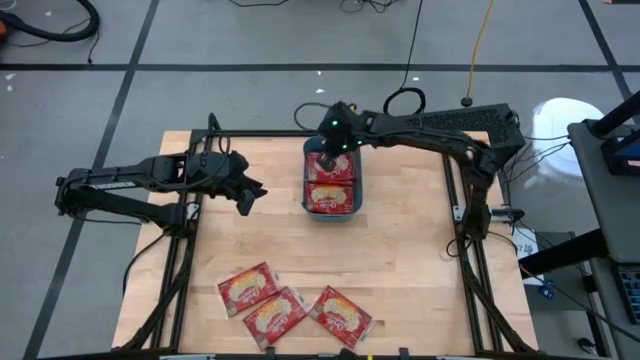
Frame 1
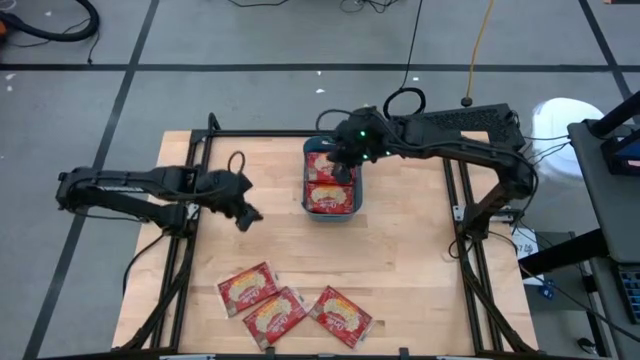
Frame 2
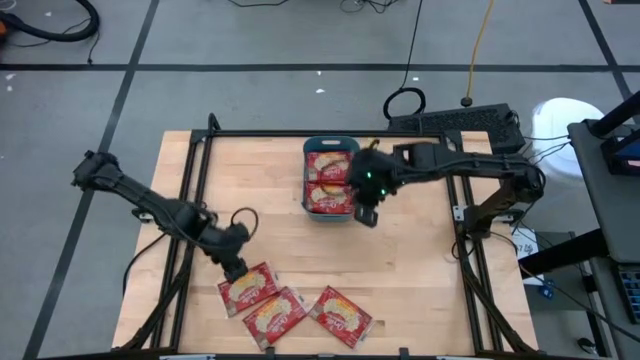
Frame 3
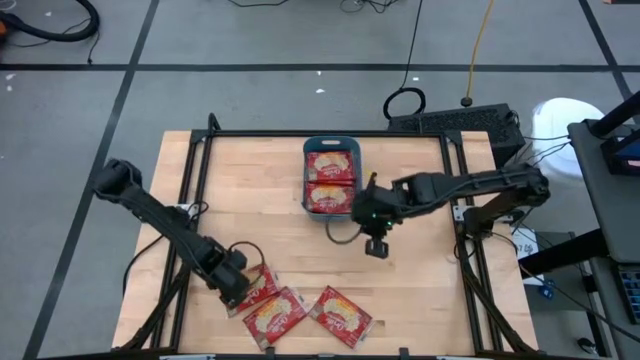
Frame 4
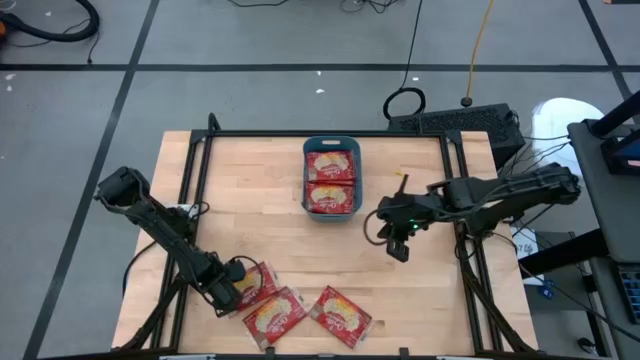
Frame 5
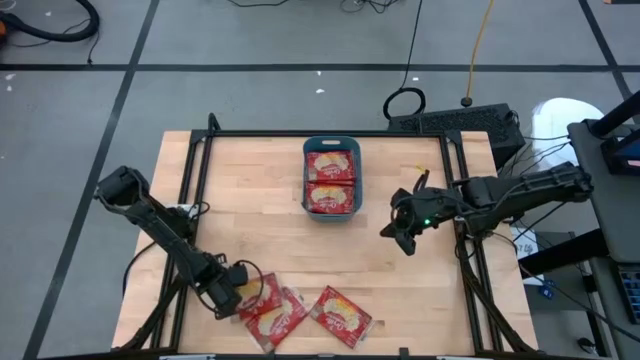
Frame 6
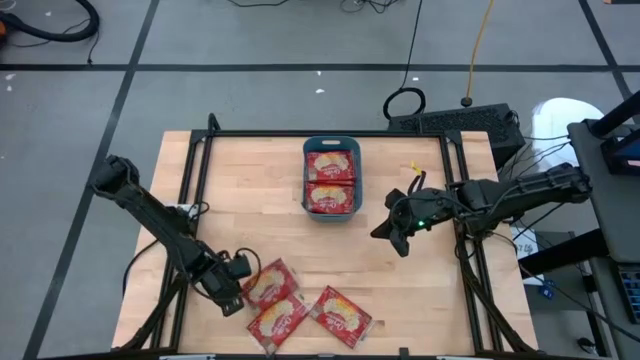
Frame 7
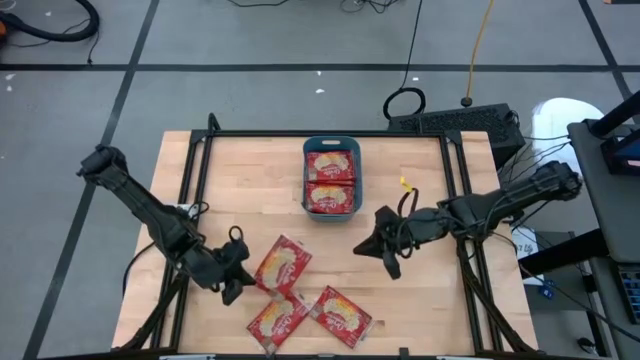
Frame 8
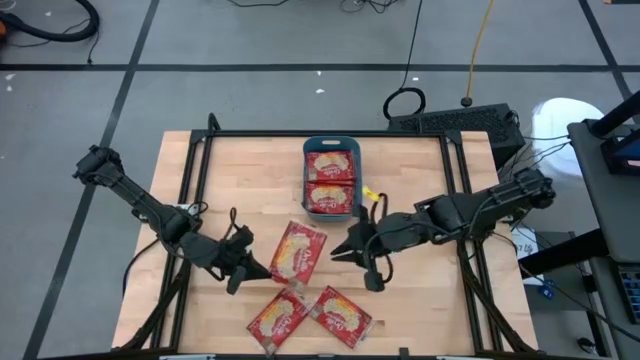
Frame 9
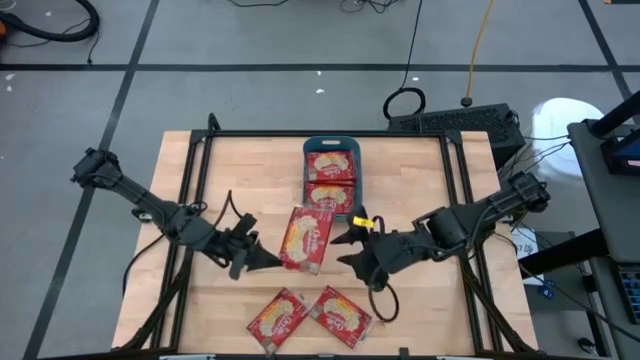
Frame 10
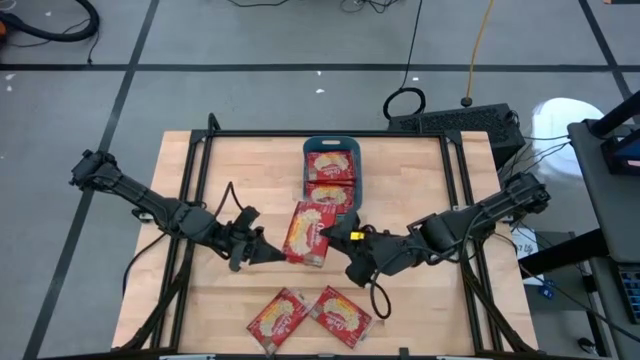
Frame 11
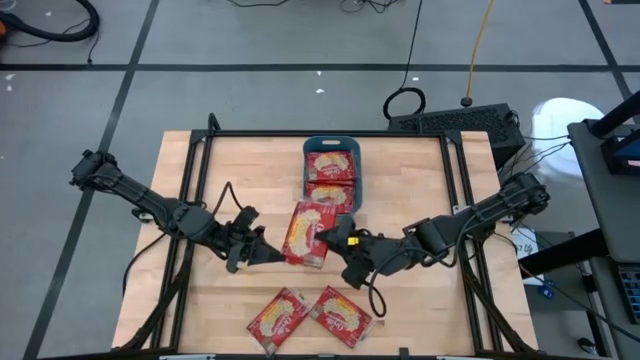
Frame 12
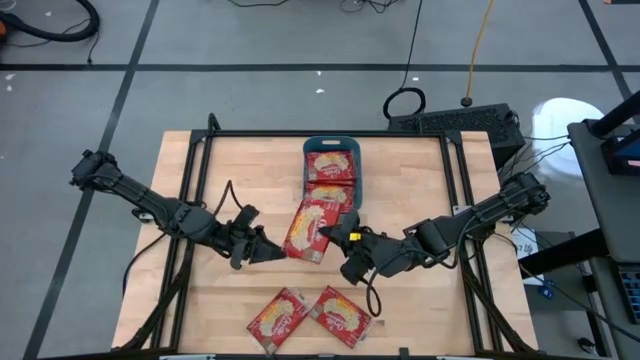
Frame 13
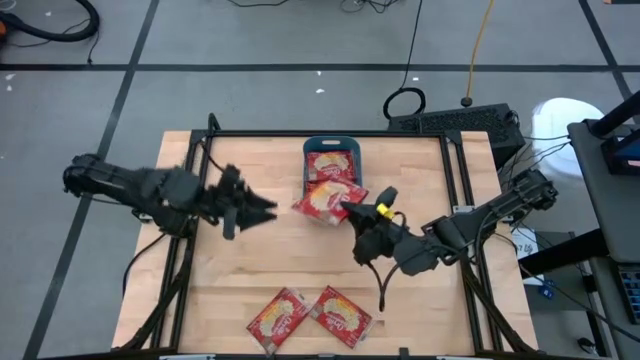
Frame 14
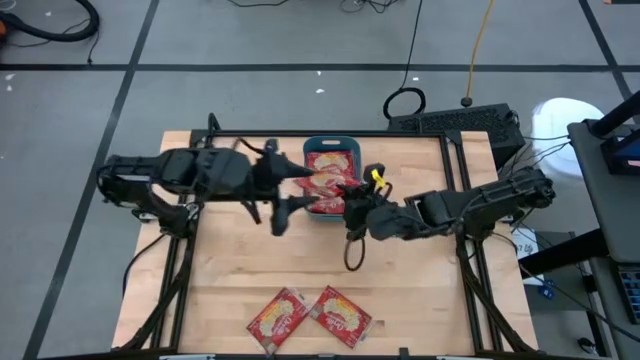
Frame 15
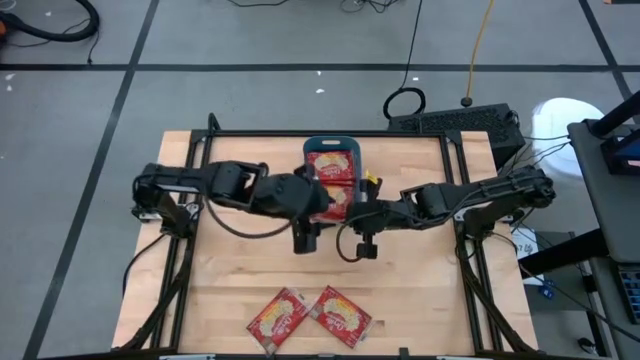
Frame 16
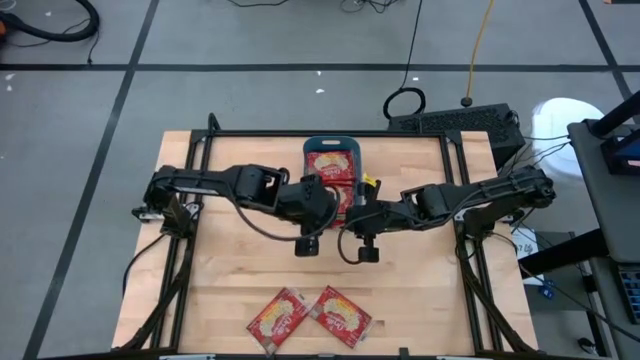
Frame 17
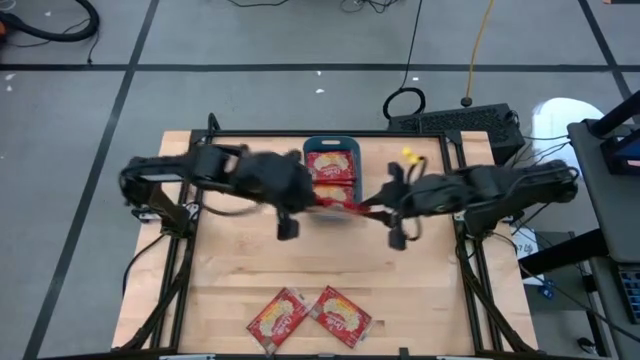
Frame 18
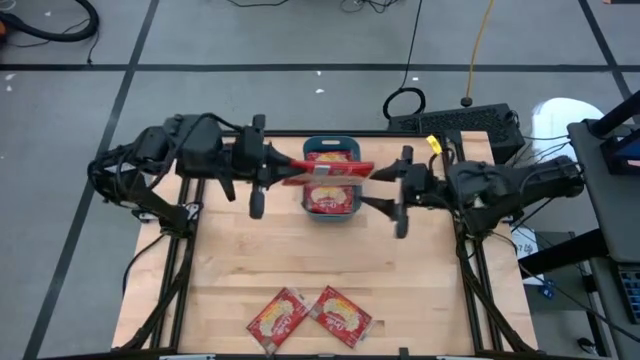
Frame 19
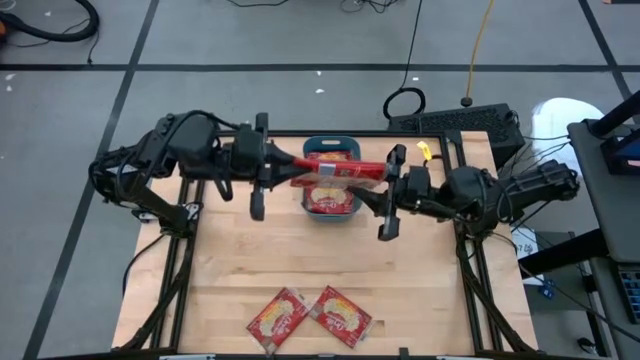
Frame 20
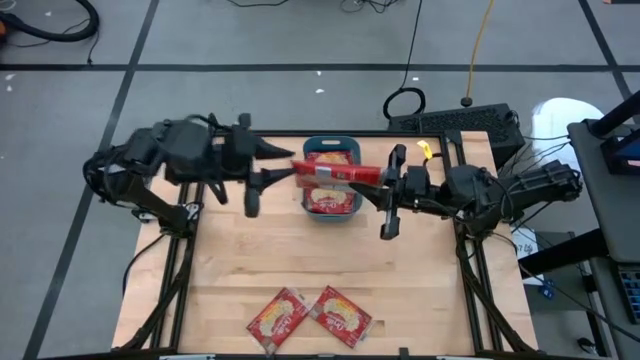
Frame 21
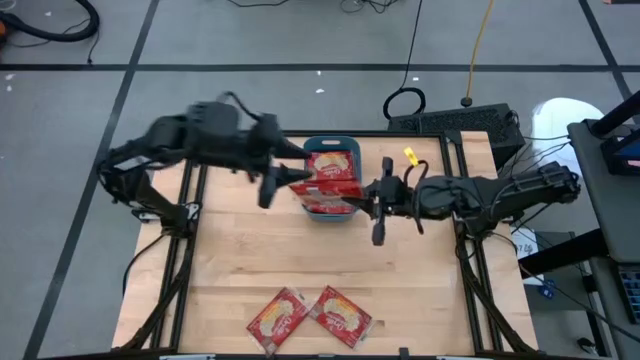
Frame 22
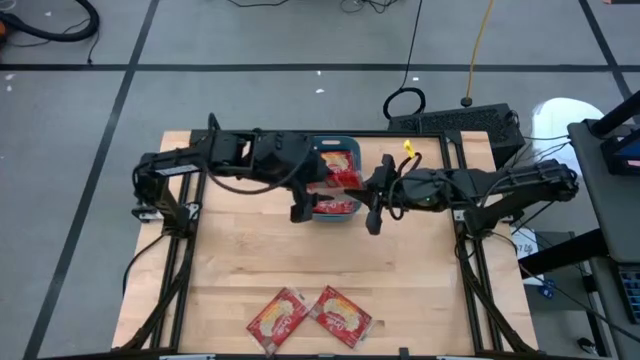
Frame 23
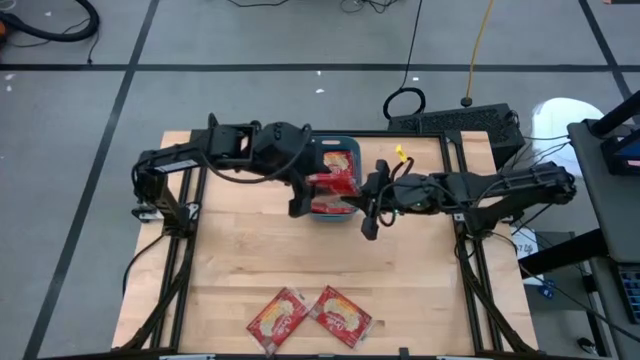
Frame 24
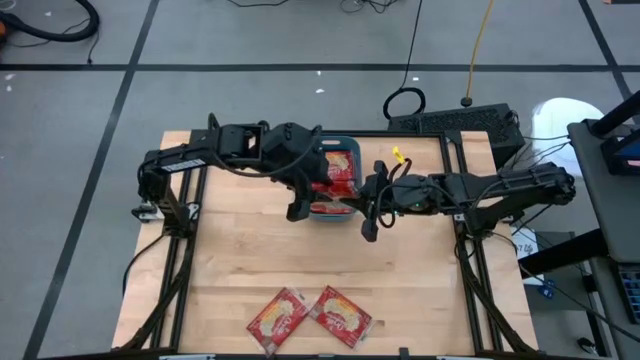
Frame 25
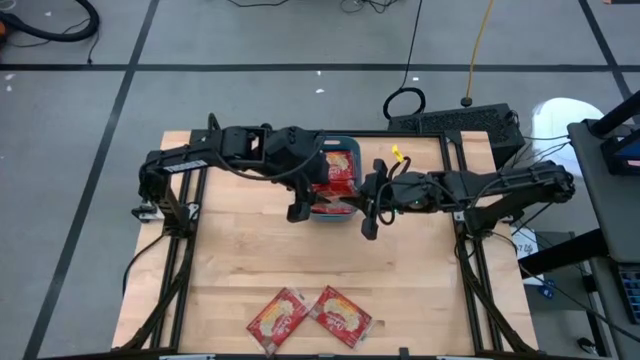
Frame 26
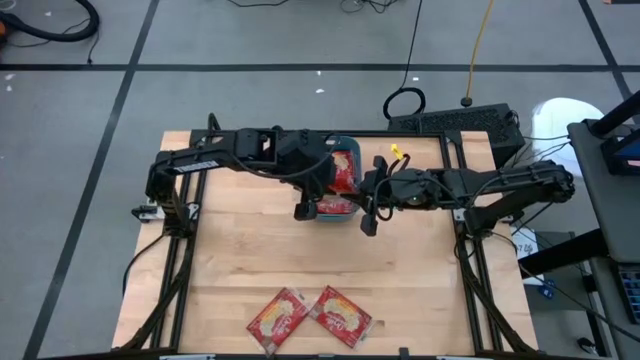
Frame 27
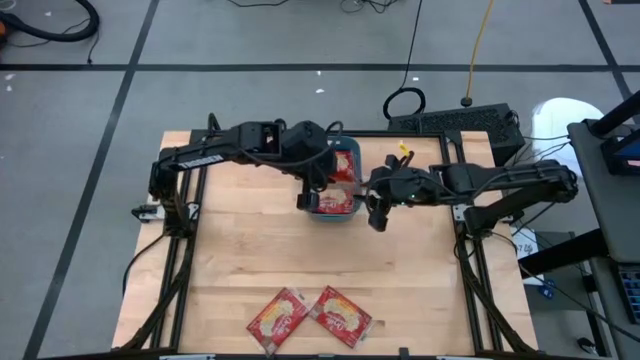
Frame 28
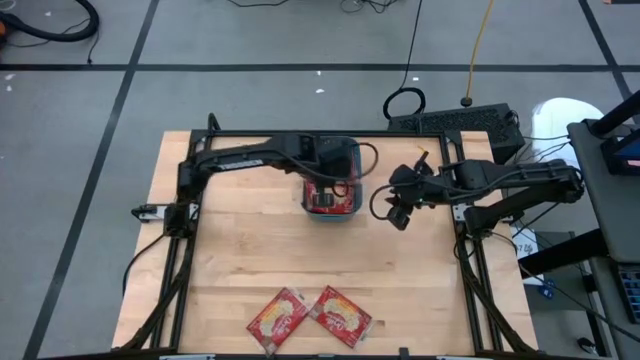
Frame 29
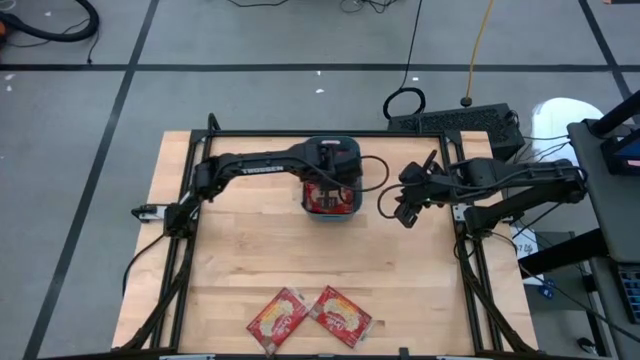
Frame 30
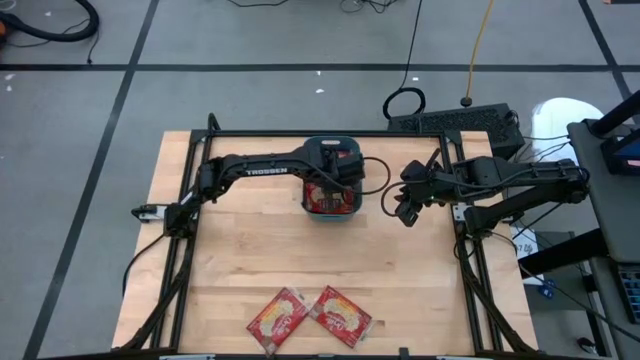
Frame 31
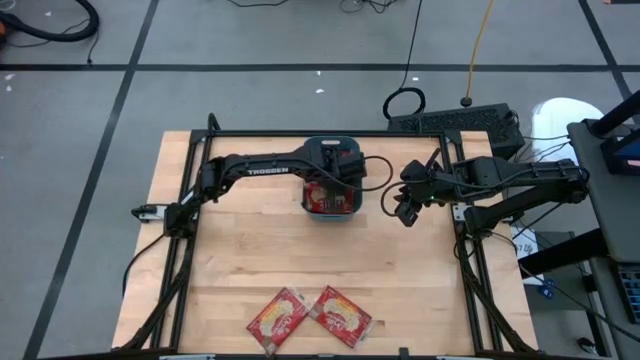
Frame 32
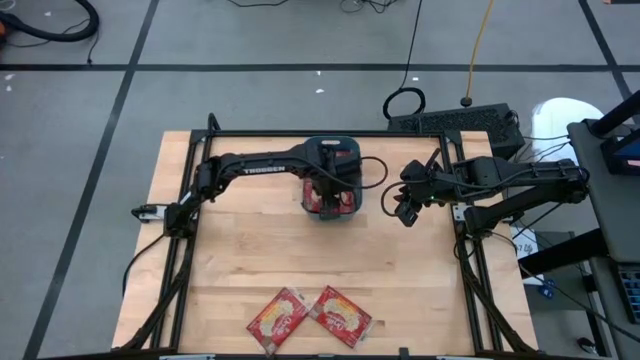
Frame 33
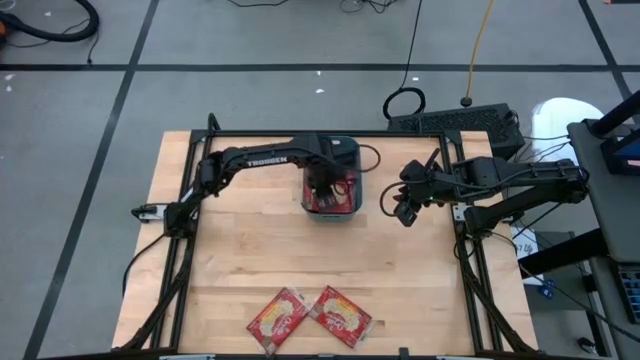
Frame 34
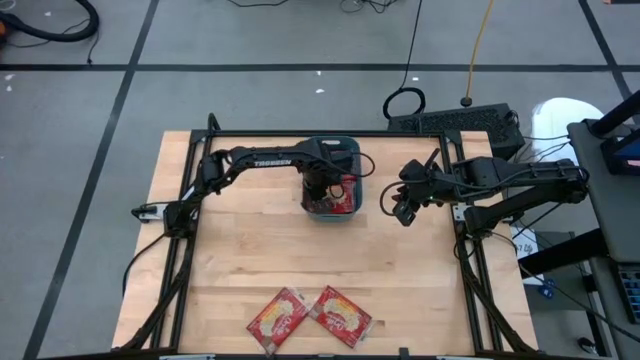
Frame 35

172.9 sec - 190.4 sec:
Task: Sort popcorn bags into baskets
Put the red popcorn bag into the blue bin

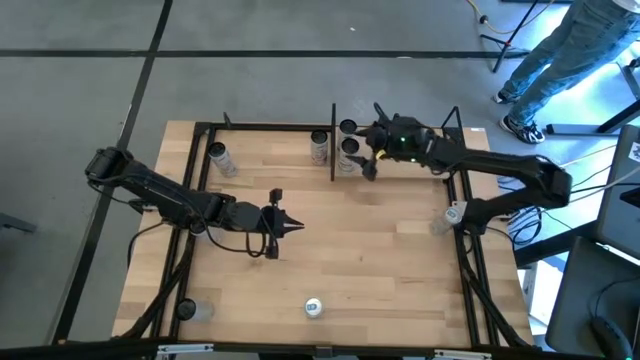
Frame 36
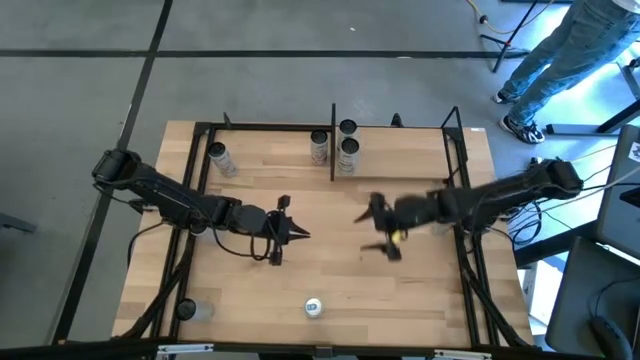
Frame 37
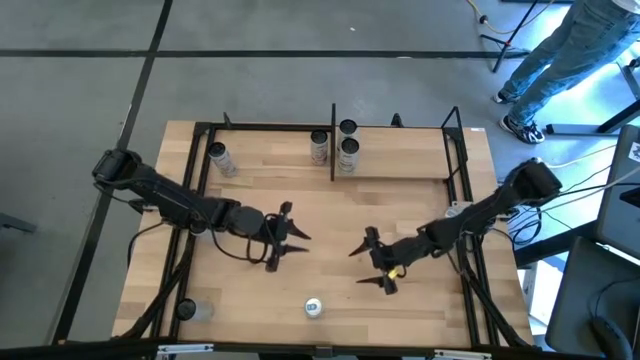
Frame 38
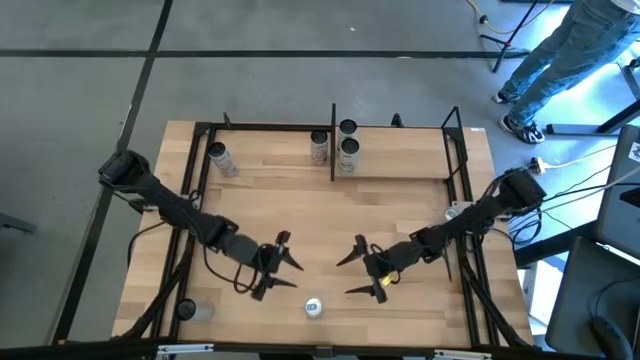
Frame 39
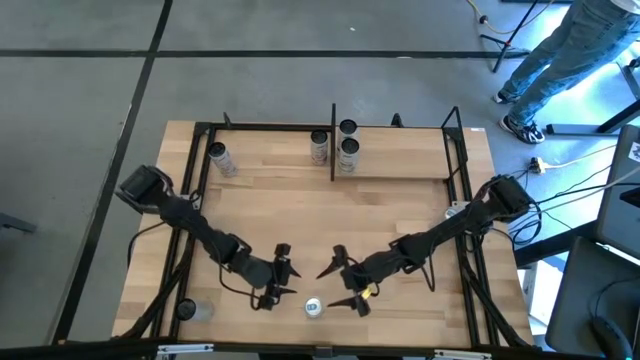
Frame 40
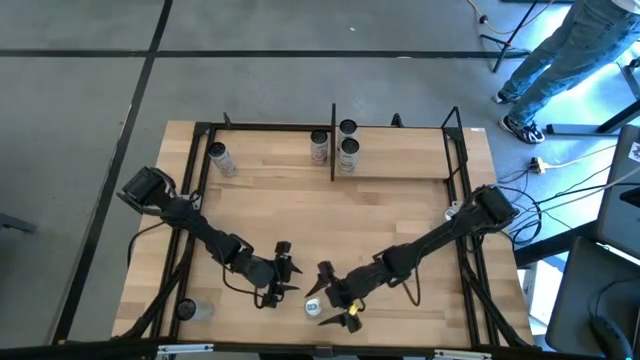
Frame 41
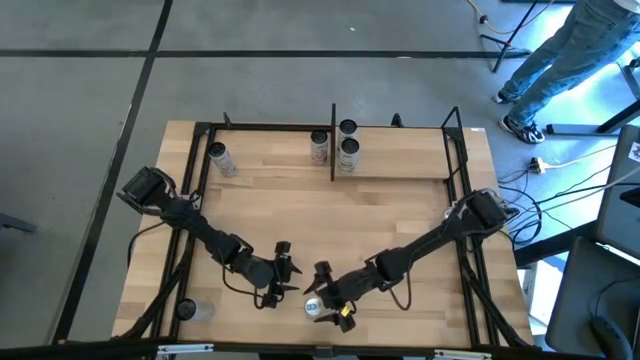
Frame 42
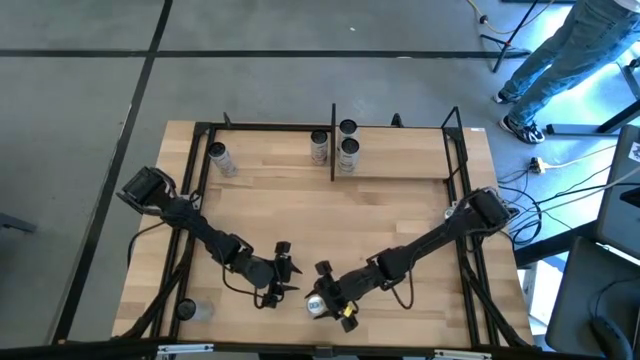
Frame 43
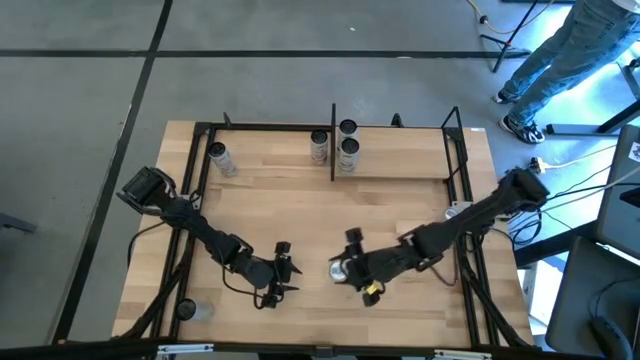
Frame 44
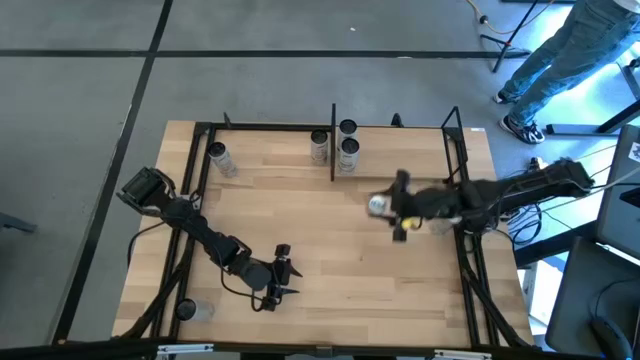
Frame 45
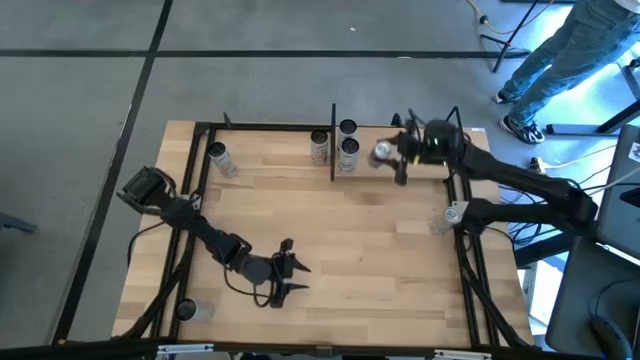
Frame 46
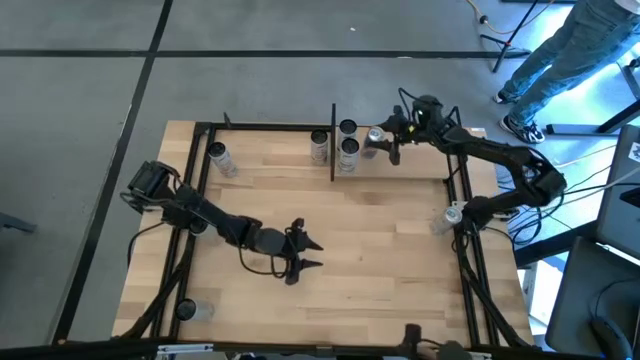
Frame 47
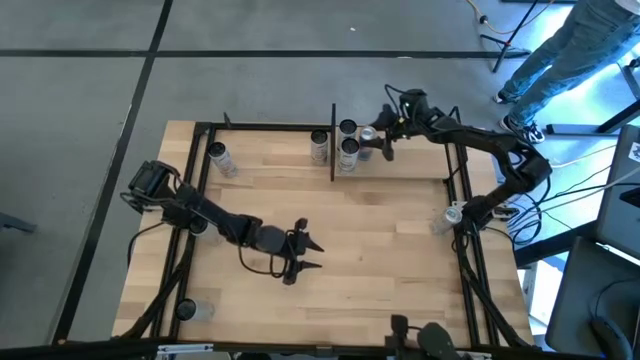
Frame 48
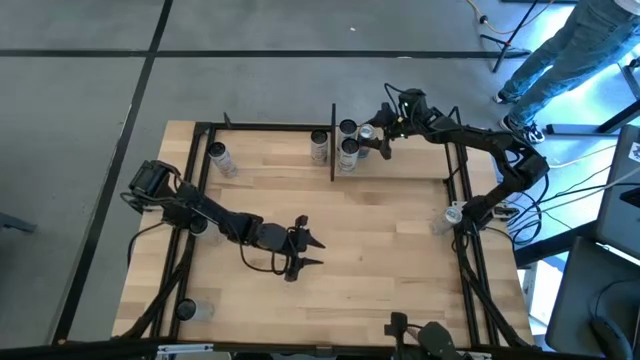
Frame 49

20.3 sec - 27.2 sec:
Task: Place canned beverage on shelf
Put the left blue soda can on the shelf
